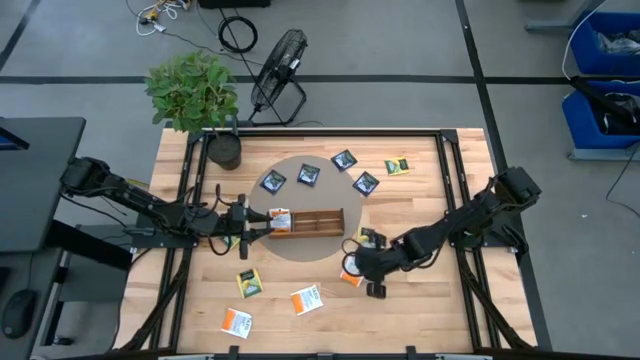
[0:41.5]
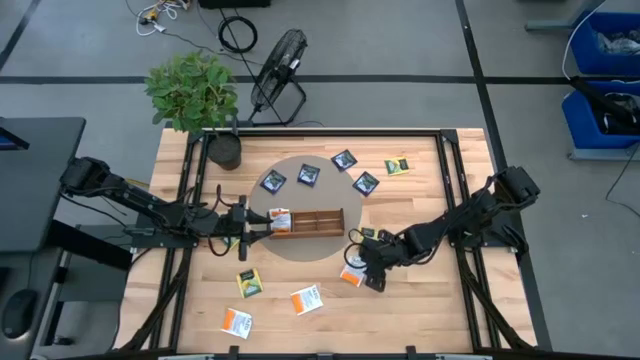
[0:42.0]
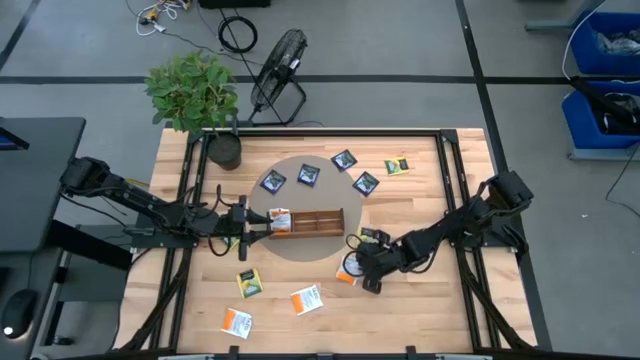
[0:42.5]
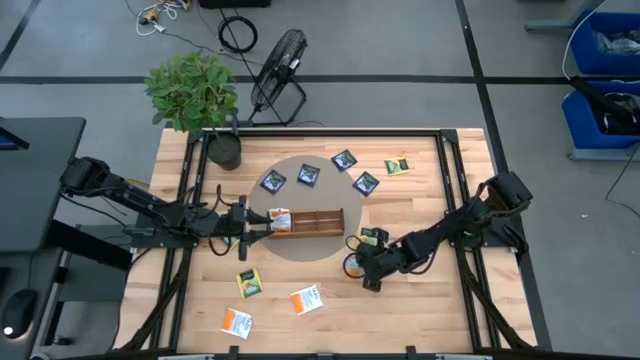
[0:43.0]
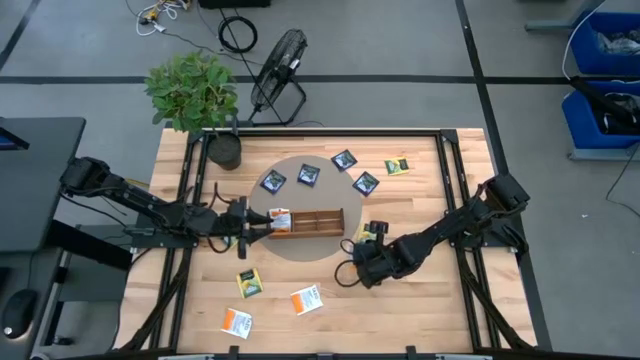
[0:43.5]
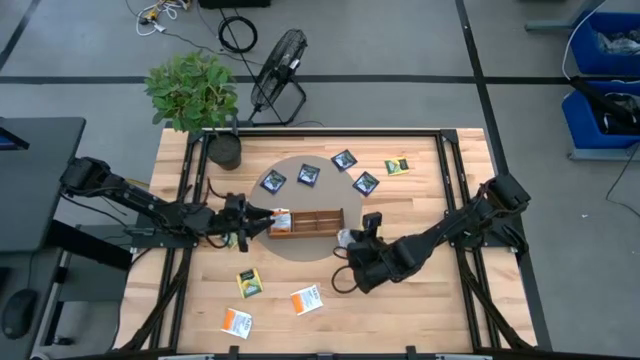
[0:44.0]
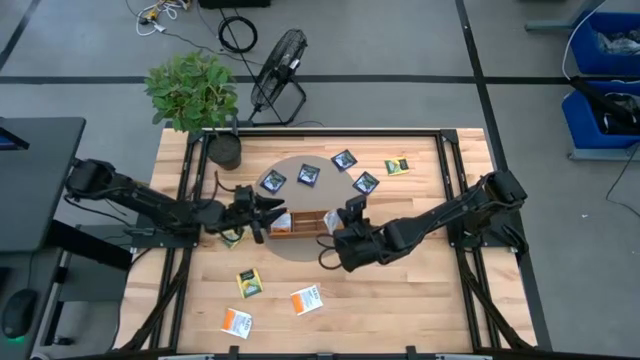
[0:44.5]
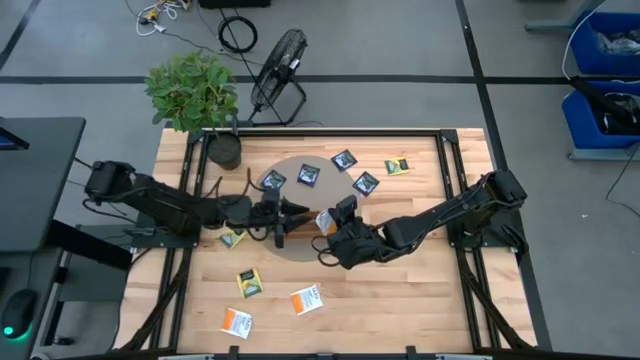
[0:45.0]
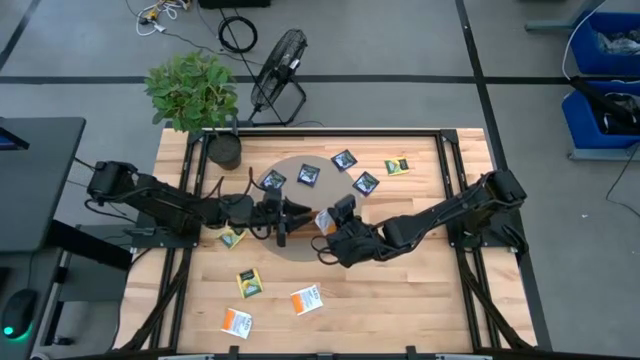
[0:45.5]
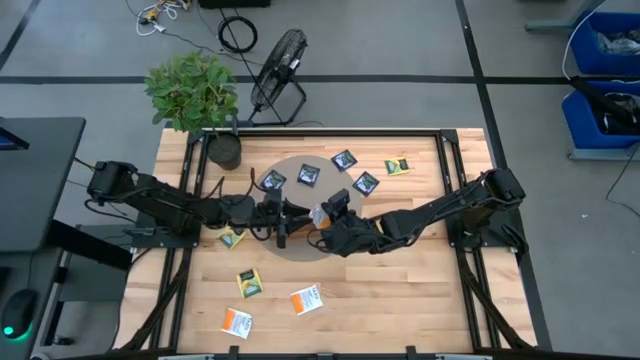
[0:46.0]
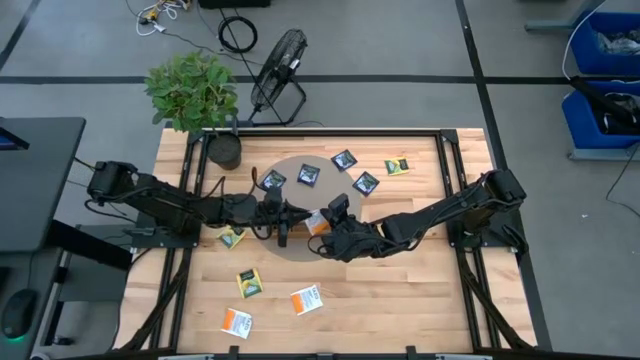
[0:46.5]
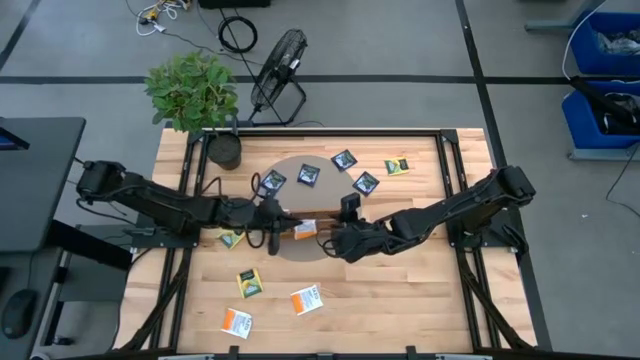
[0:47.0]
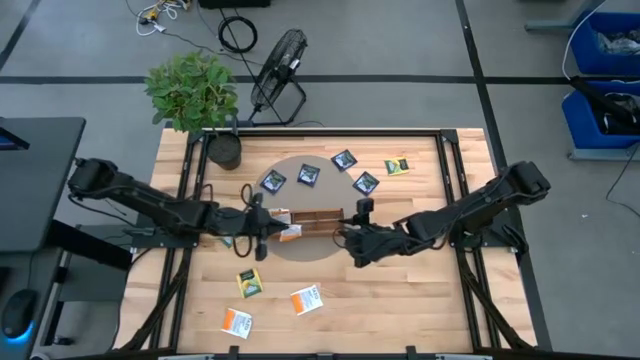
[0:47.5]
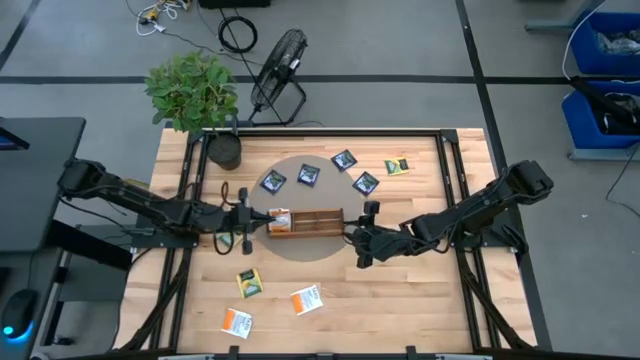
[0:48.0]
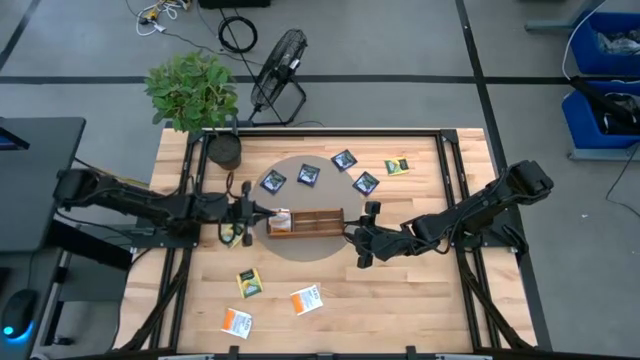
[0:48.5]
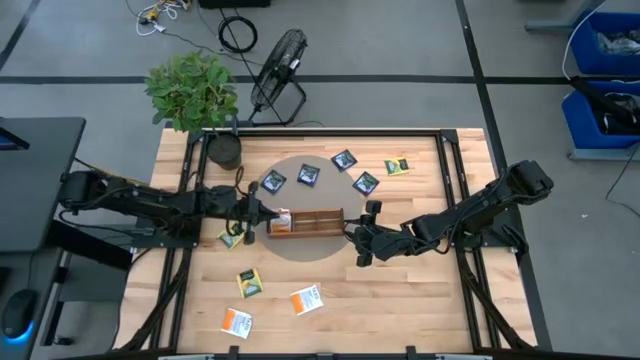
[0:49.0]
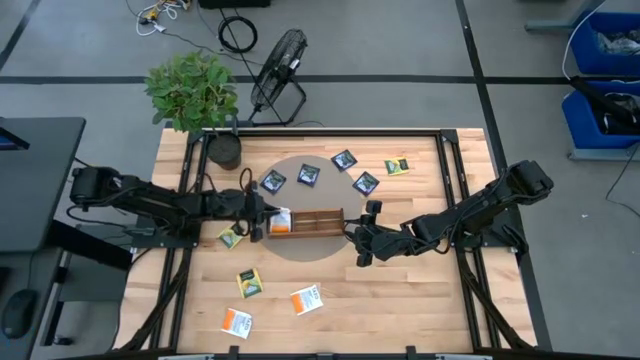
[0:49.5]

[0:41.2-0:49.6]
Task: Pick & Place Tea
Put the bottom right orange tea bag into the left compartment of the wooden organizer

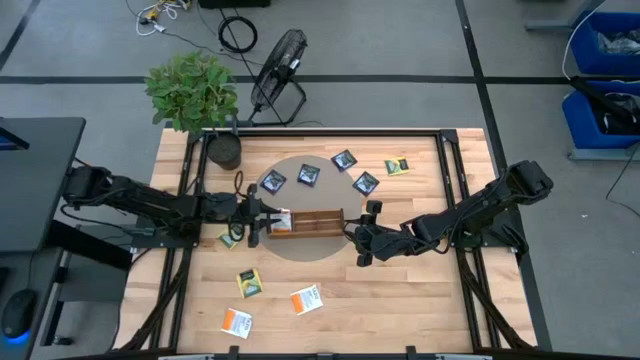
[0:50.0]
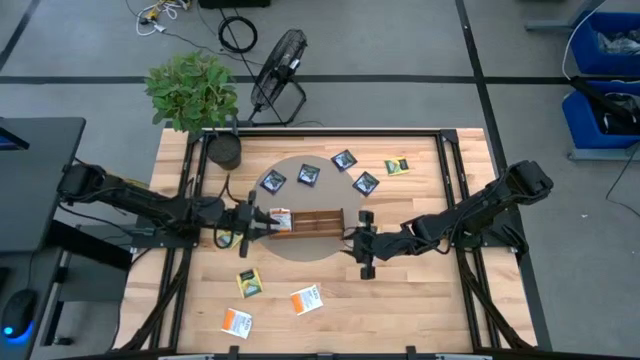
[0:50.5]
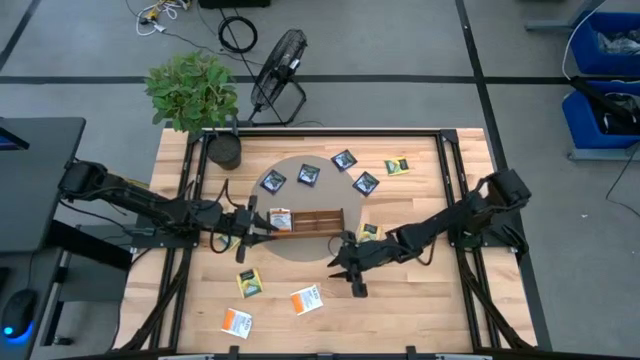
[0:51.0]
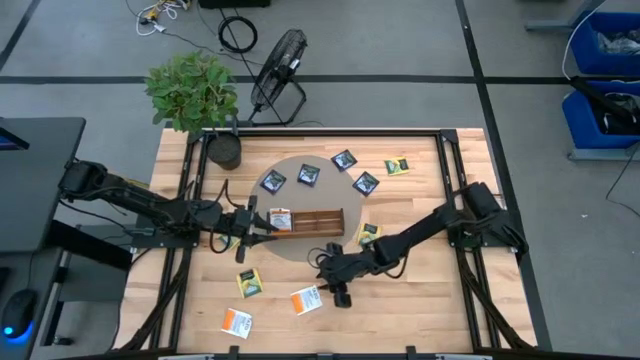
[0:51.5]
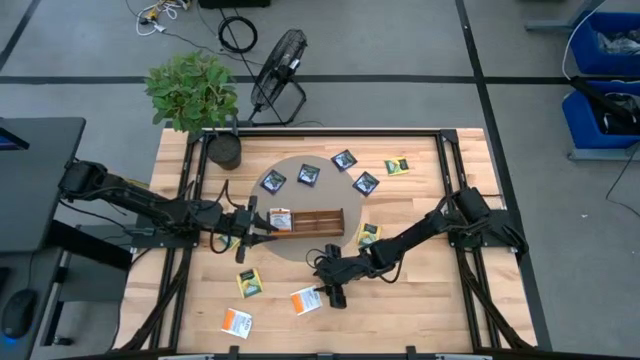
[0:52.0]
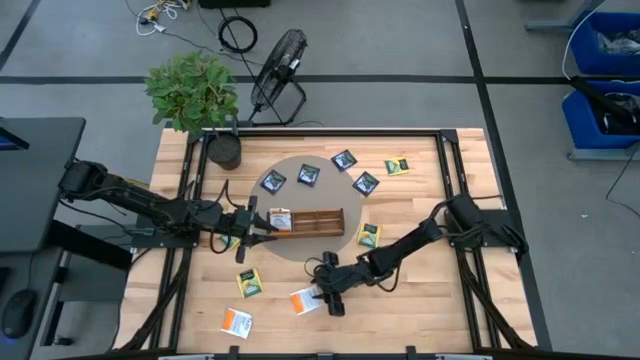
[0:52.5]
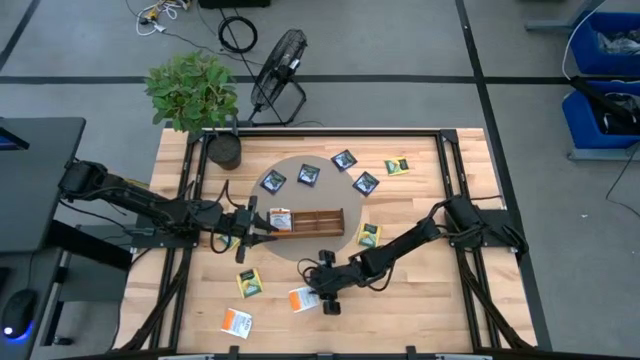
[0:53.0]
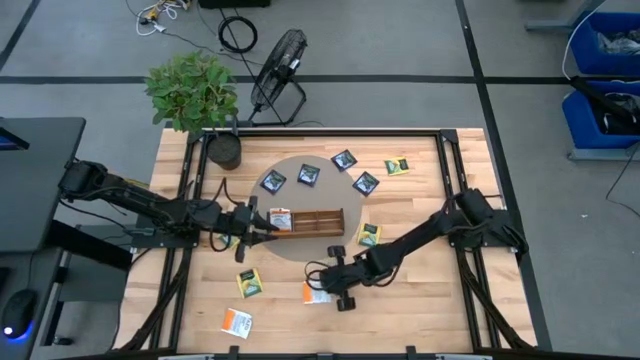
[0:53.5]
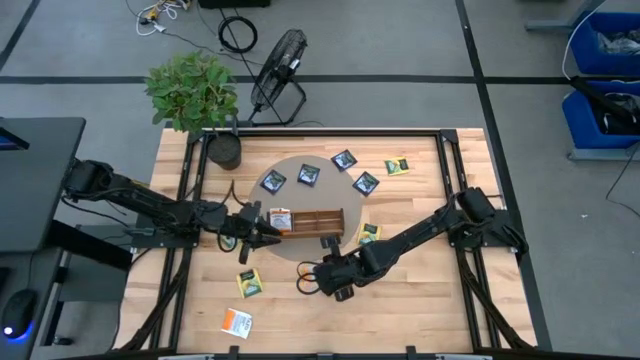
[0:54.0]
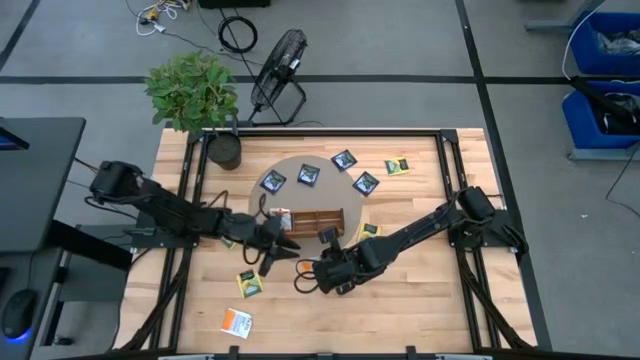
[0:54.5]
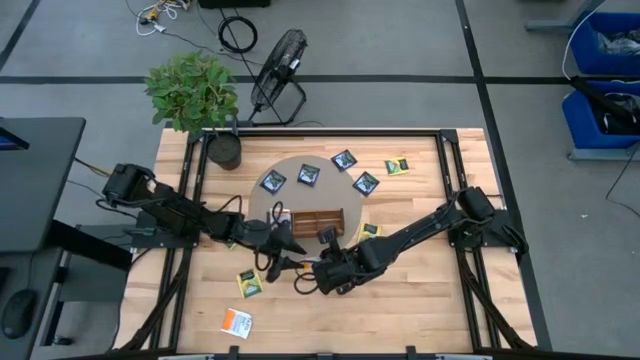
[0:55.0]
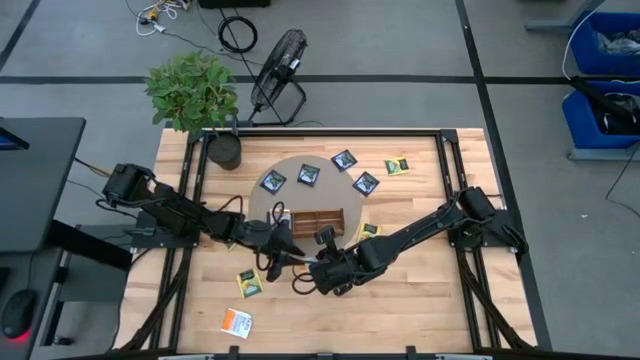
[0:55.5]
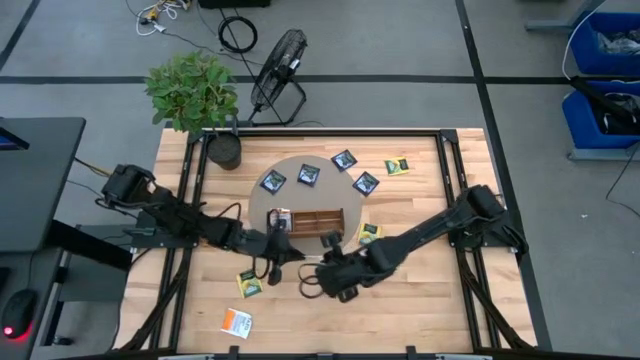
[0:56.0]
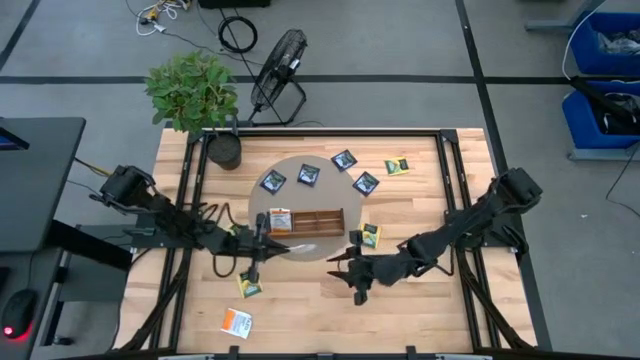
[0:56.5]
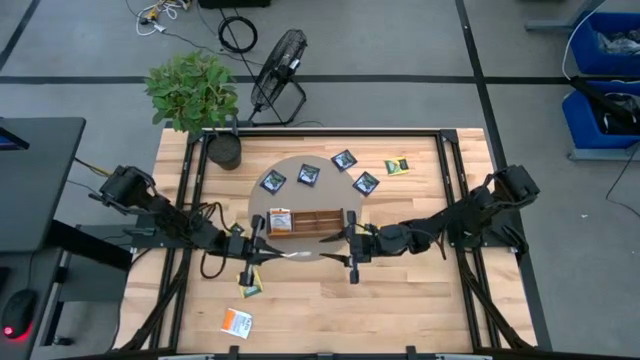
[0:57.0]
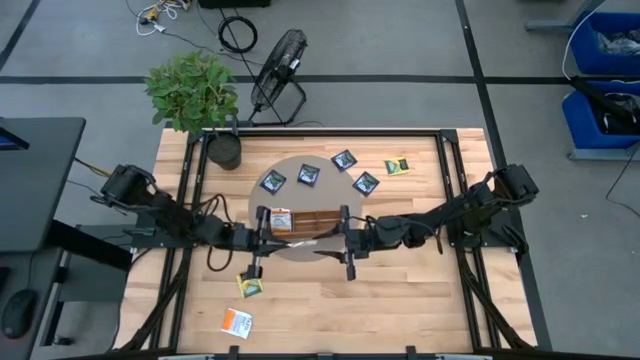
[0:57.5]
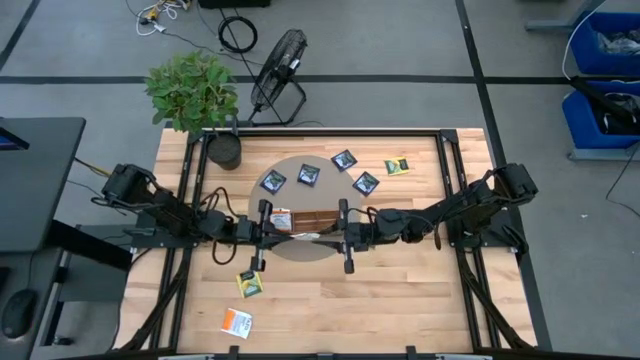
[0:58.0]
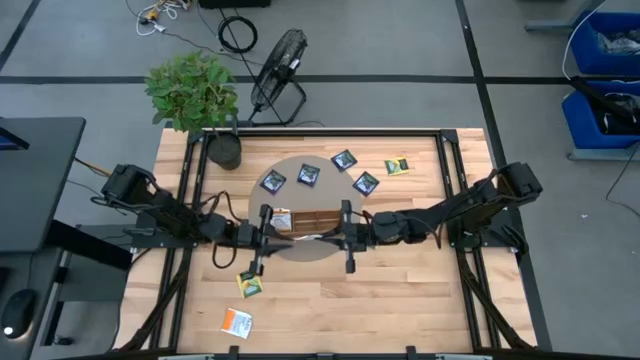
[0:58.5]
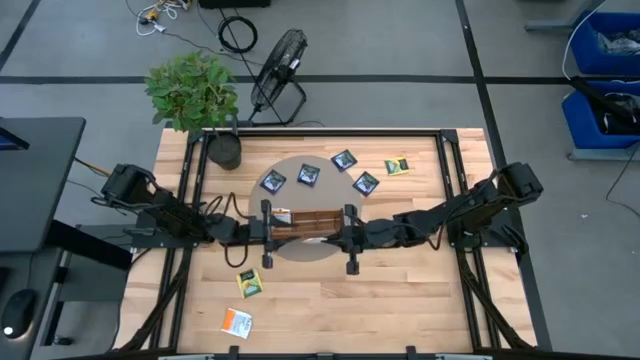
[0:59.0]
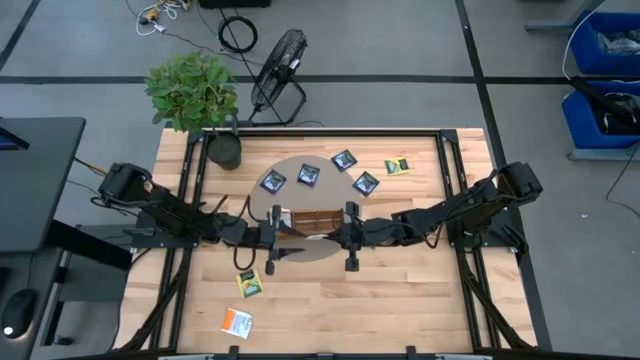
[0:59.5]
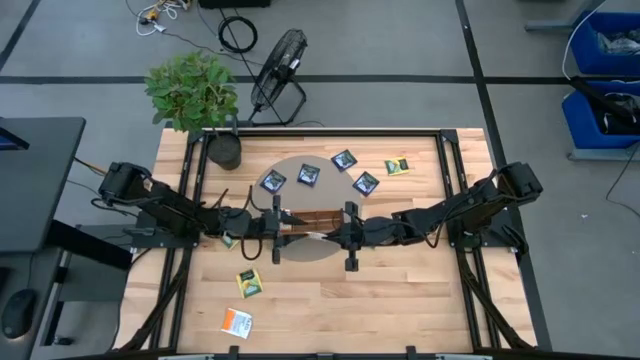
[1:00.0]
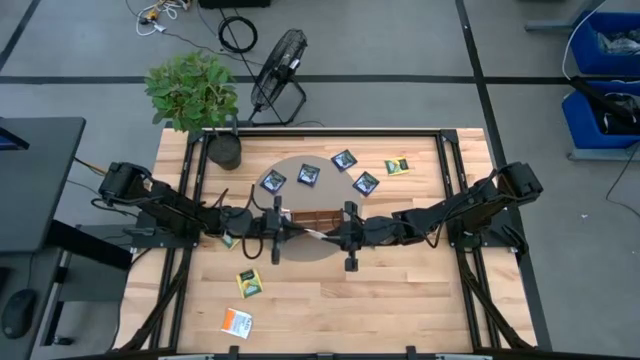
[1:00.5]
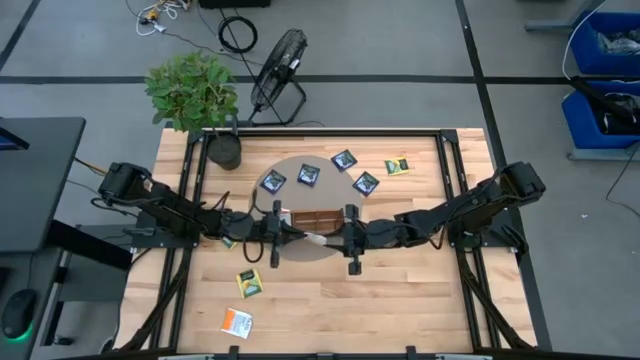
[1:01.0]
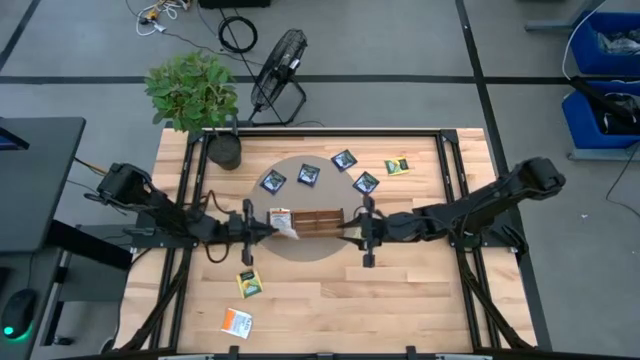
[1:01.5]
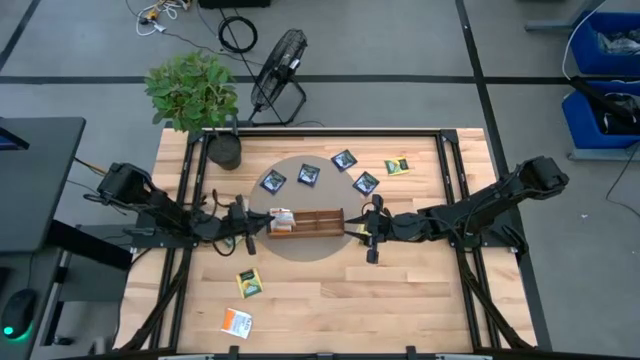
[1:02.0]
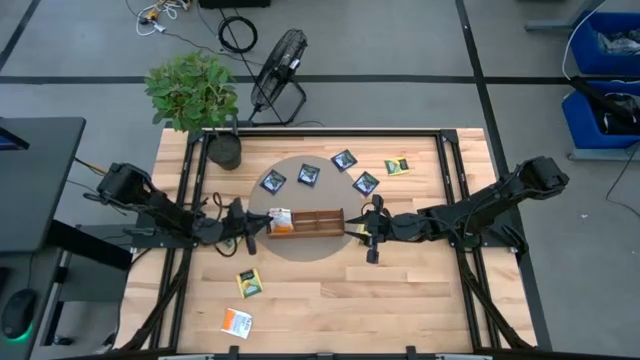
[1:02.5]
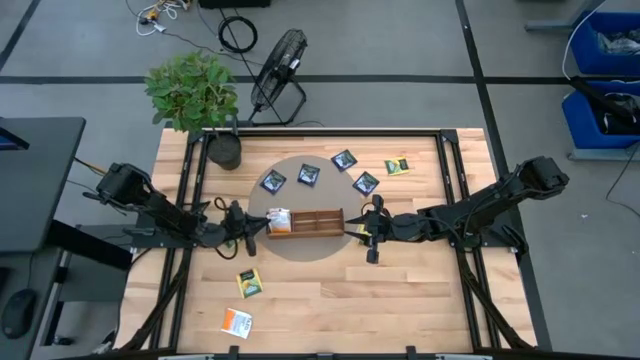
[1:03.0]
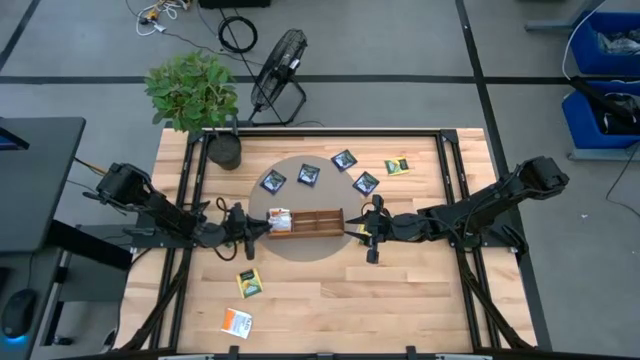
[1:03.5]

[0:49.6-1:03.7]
Put the right orange tea bag into the left compartment of the wooden organizer
